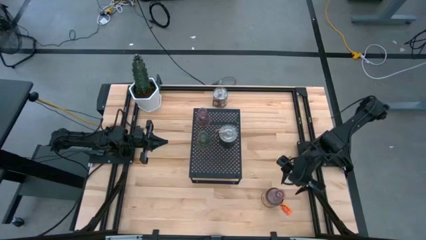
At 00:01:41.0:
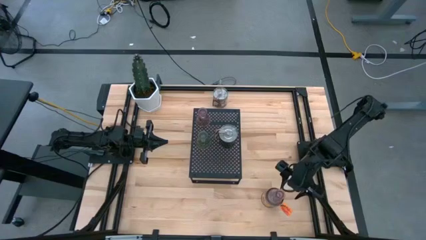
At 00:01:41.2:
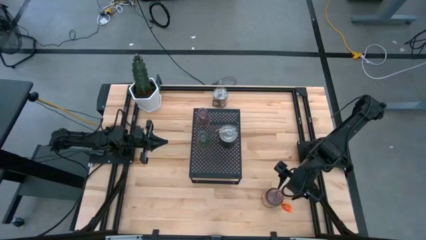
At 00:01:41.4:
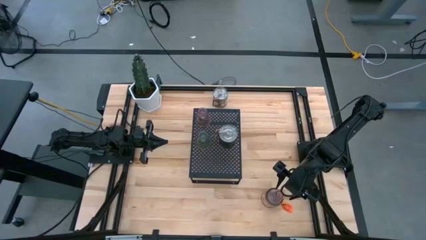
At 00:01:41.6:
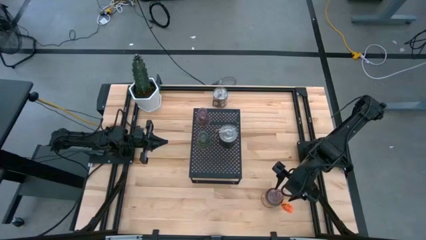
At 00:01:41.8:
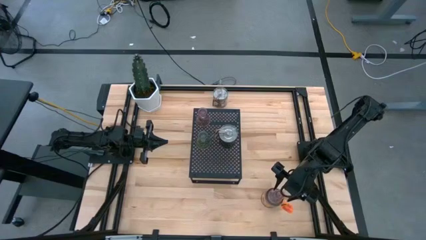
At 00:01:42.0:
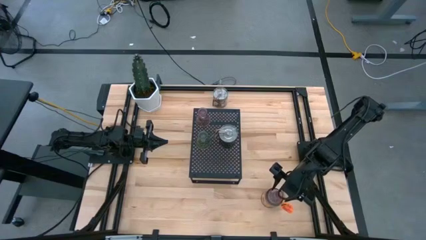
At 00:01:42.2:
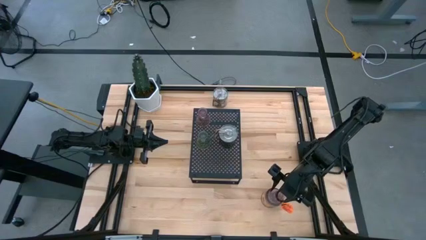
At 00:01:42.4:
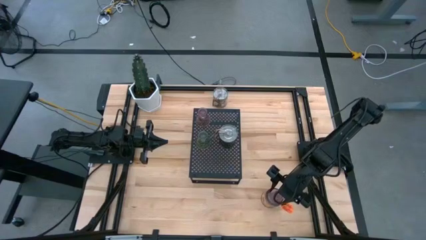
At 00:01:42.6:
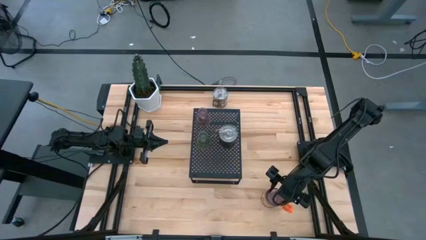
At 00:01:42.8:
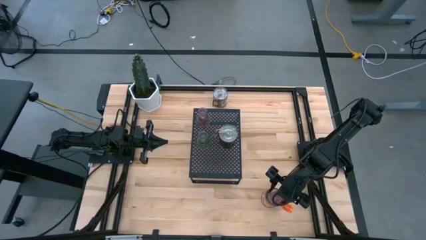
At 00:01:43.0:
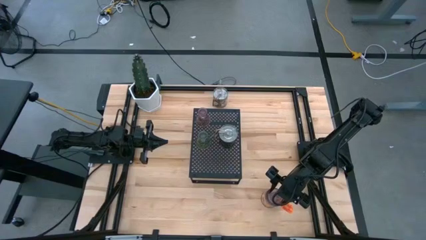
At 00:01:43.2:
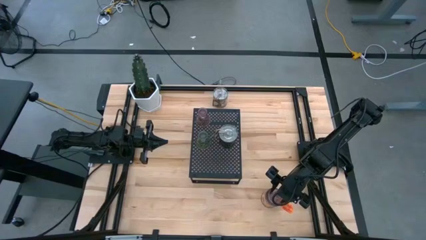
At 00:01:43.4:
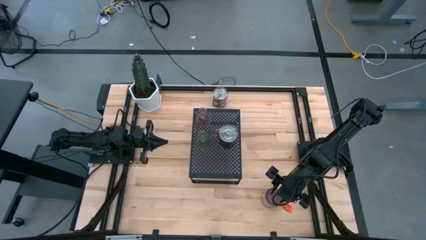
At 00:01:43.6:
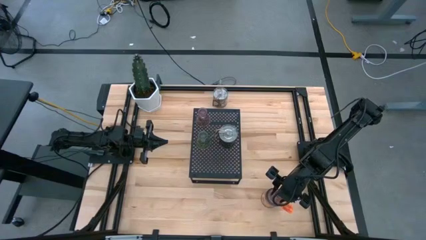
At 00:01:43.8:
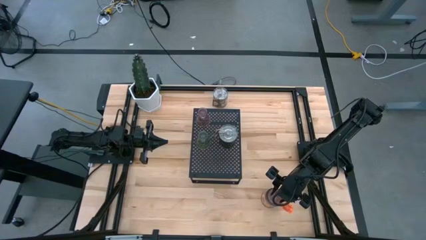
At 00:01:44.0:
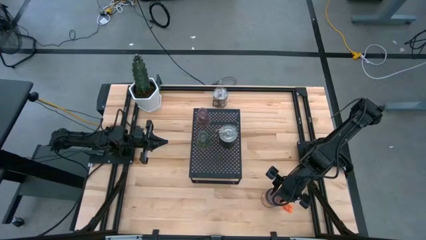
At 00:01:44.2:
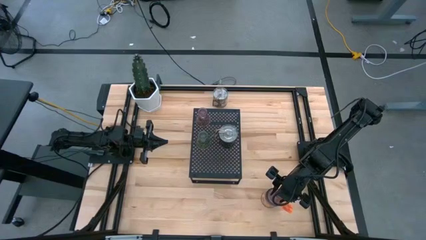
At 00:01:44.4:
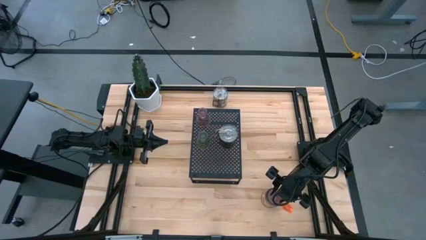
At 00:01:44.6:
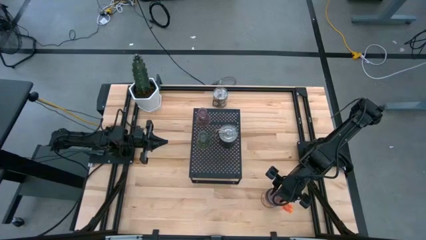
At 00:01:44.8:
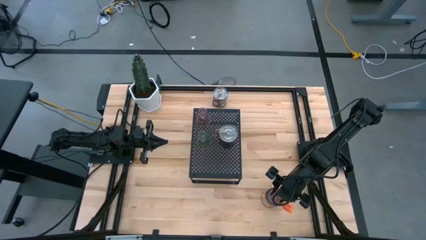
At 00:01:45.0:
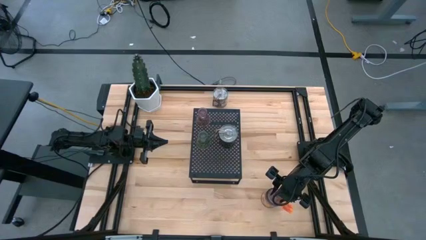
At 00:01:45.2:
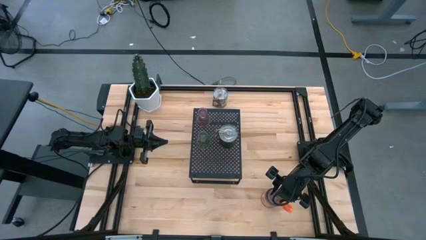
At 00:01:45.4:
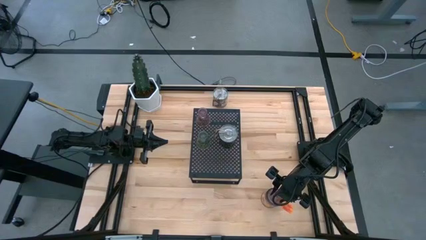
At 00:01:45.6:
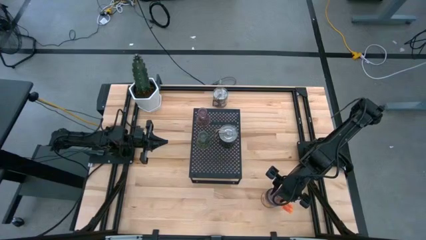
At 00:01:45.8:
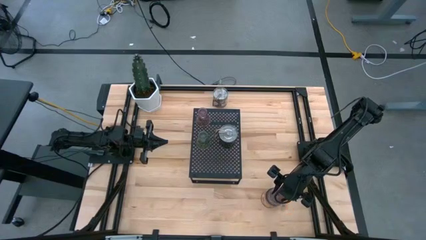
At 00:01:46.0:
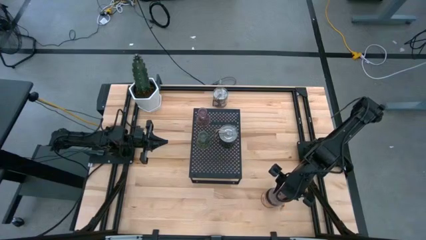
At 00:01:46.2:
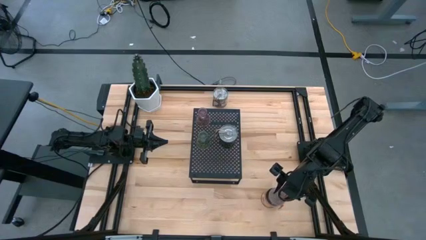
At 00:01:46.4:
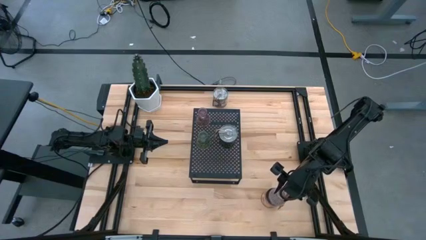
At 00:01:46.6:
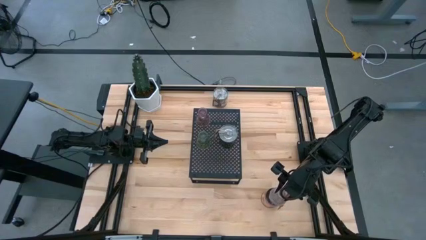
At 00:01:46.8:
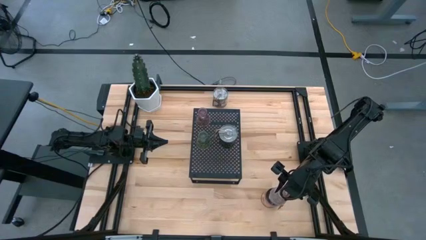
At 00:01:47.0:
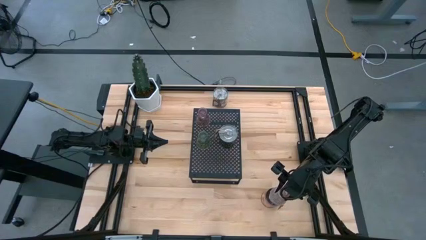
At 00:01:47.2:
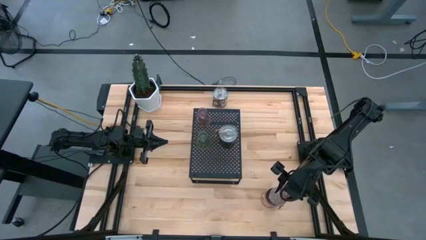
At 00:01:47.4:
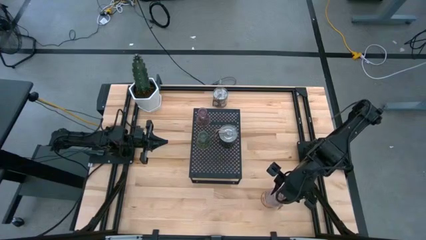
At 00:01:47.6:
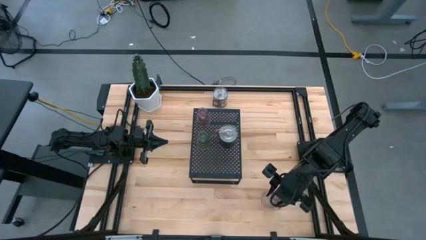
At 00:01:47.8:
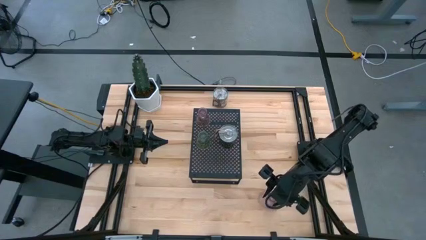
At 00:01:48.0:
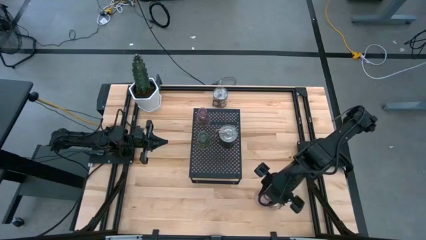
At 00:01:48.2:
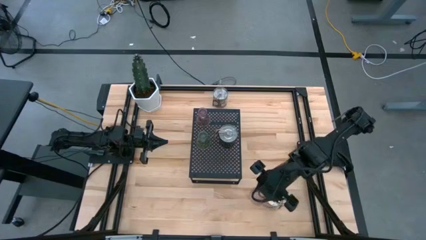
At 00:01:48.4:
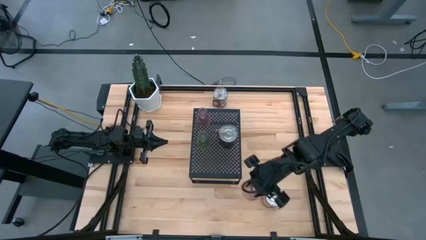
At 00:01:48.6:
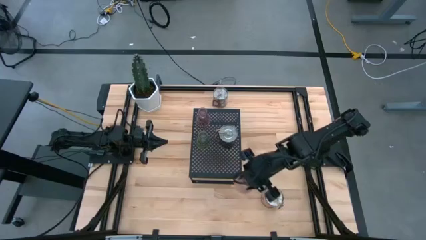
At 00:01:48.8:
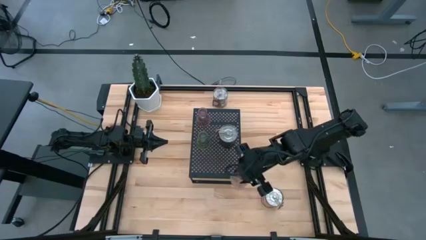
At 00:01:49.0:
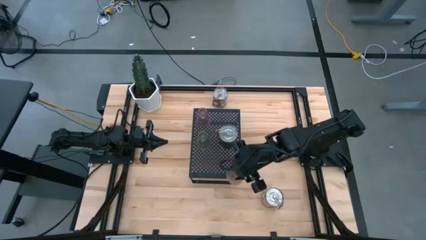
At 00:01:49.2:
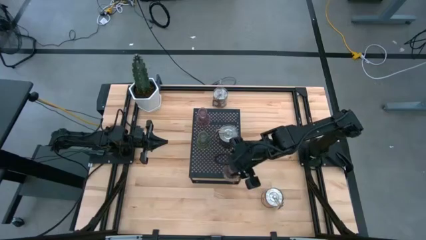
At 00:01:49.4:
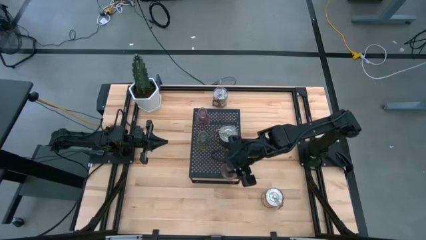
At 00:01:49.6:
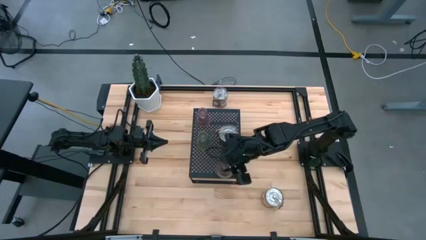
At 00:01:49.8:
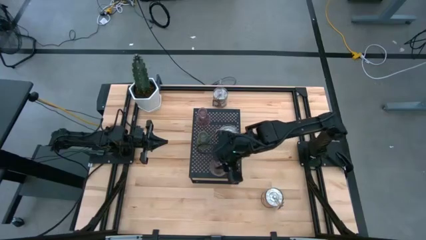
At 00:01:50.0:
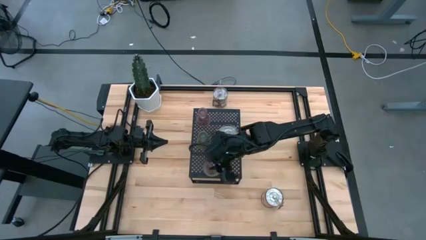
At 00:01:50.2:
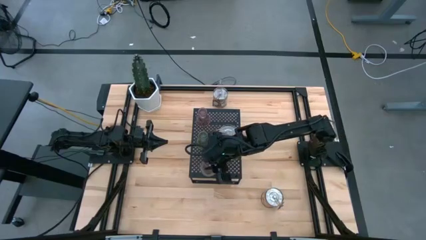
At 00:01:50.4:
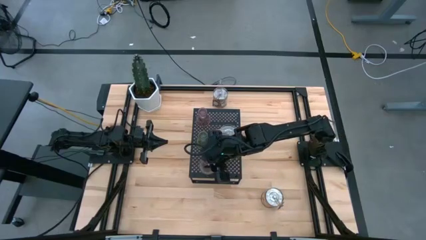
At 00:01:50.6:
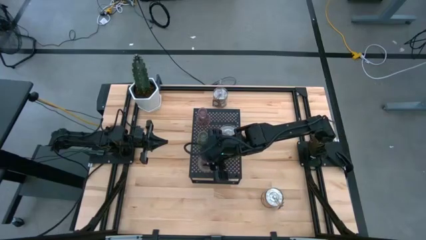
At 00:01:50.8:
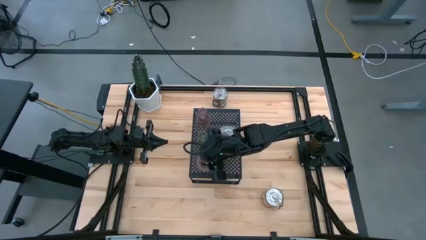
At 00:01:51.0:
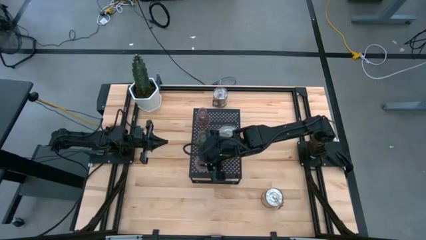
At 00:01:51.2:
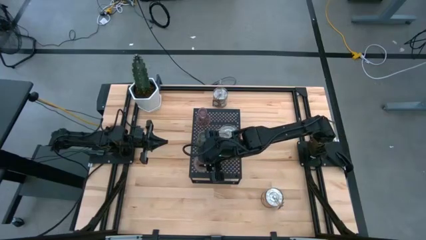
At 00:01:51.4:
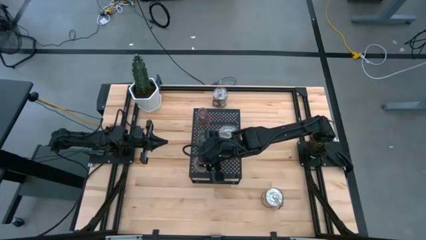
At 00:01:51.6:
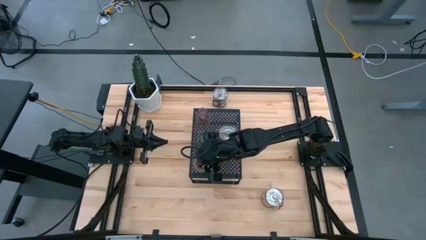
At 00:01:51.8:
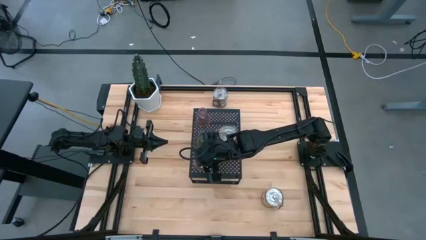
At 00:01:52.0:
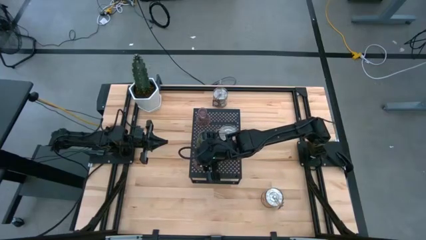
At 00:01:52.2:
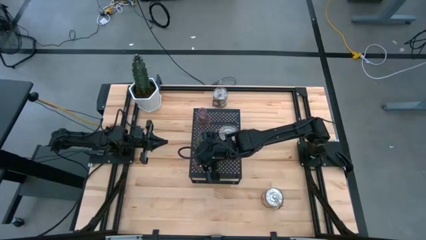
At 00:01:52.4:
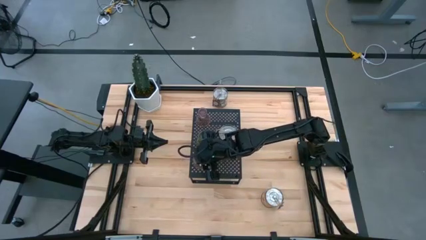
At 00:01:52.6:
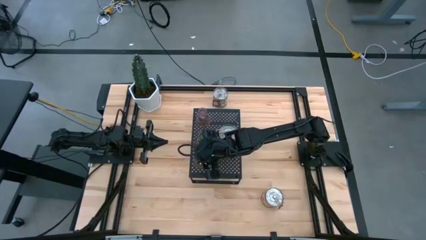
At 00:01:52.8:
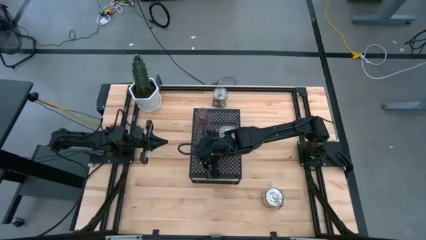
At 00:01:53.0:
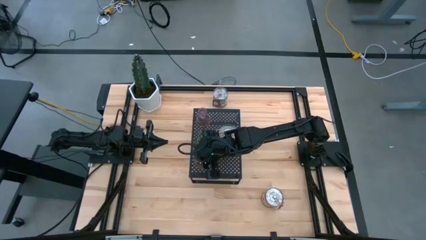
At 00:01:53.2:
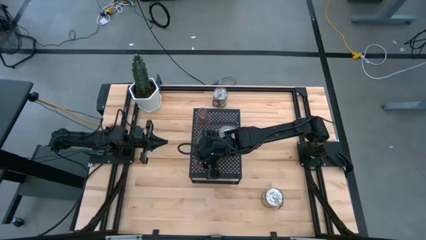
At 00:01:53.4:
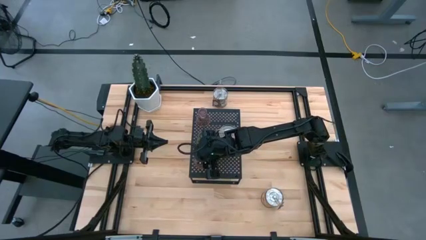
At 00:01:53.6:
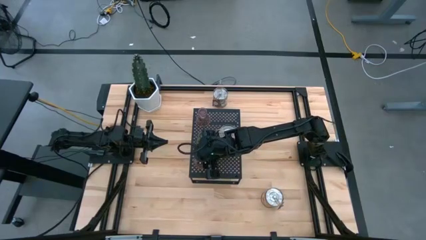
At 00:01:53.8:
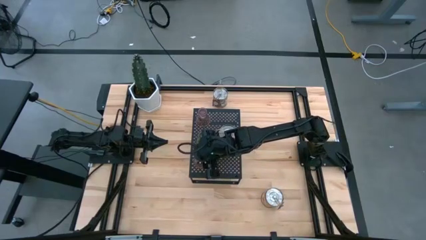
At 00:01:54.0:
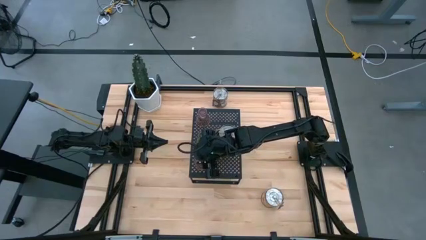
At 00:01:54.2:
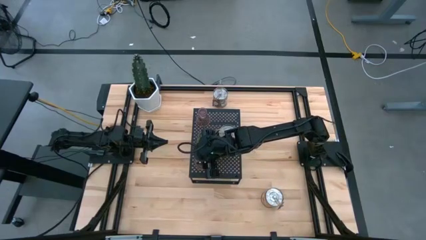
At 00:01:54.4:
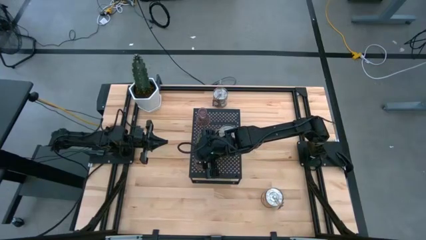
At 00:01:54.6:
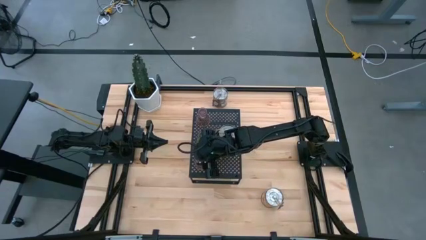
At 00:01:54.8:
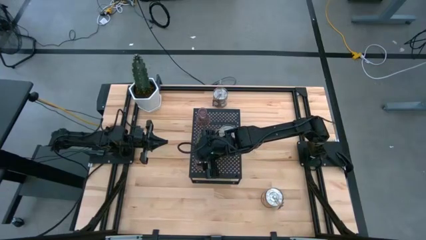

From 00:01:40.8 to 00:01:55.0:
Task: Pick & Place candle stick holders
Put the pink candle vase on the shelf

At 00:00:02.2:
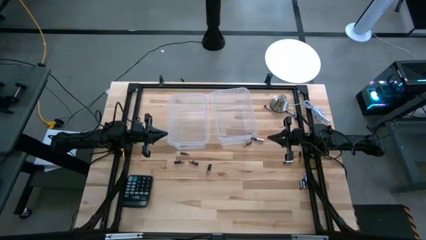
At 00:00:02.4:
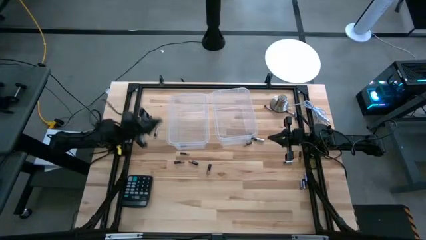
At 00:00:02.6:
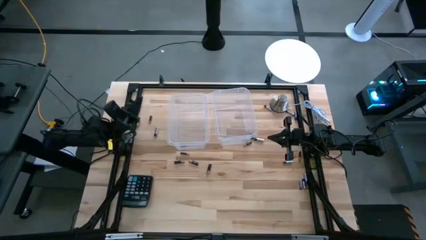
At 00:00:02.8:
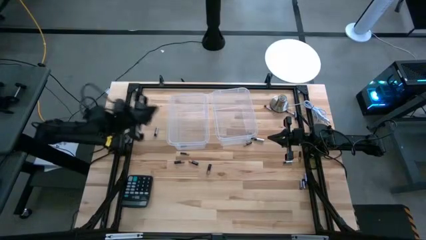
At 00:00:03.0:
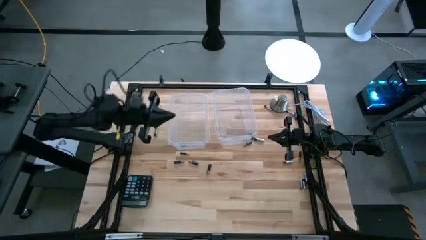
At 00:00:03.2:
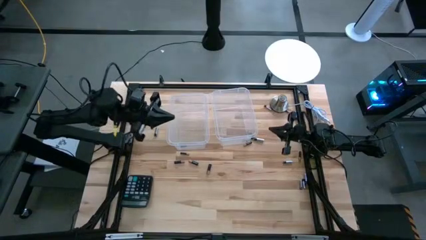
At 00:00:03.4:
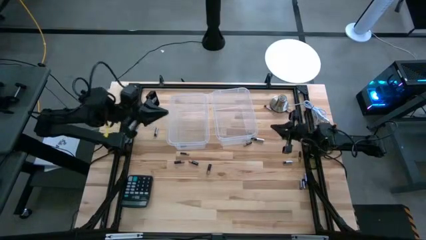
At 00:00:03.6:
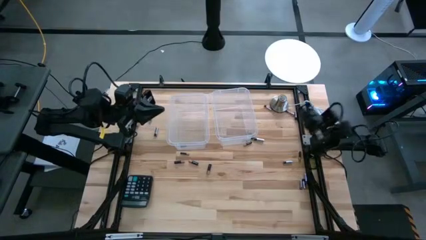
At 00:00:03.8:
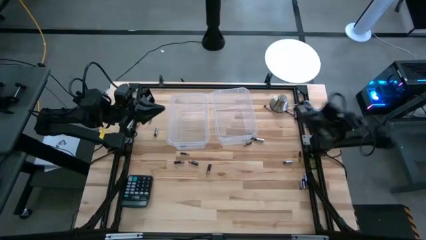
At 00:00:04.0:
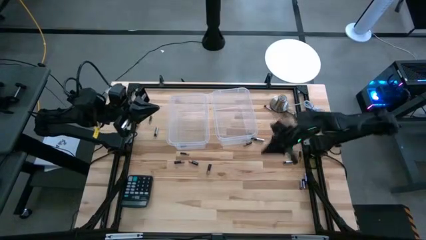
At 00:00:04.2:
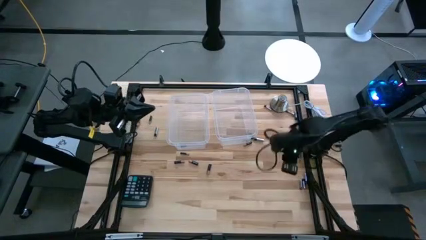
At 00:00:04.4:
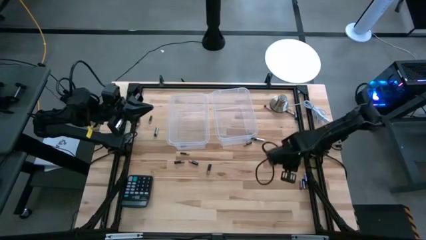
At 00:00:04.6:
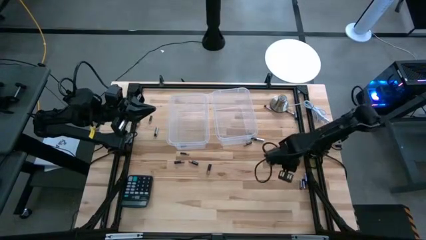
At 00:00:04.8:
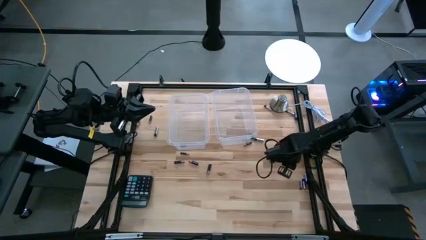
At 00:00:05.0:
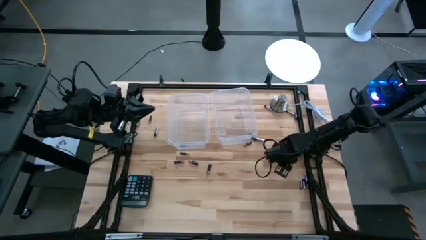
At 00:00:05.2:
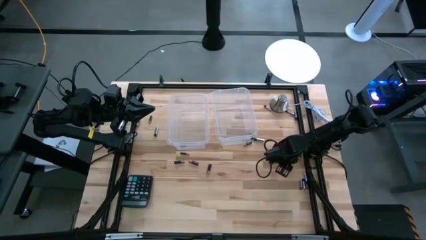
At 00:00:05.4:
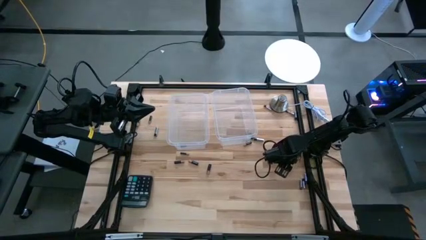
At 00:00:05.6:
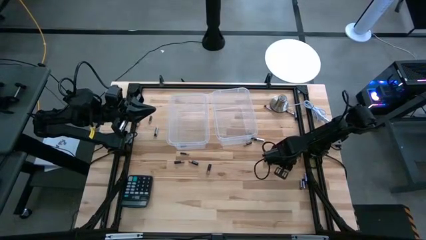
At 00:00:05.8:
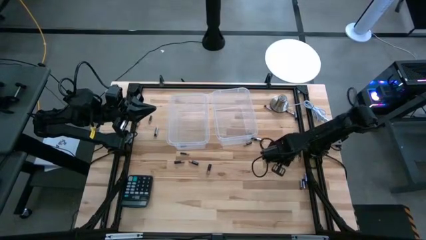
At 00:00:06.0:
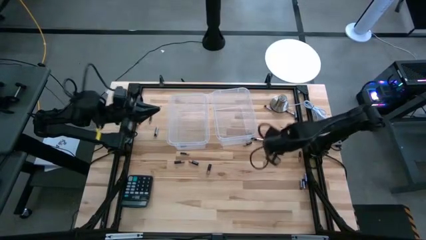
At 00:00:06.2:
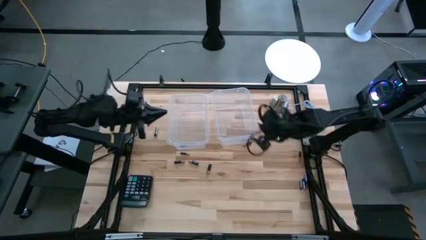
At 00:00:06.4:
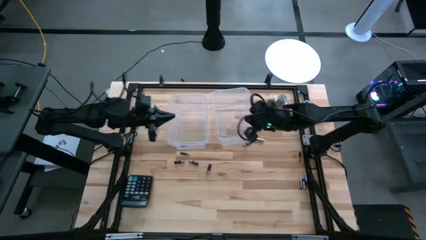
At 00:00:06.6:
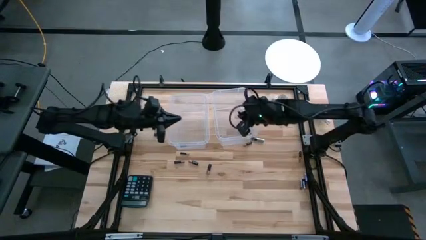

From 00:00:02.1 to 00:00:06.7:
Task: Sort batteries
Put silver battery into the right transparent bin
